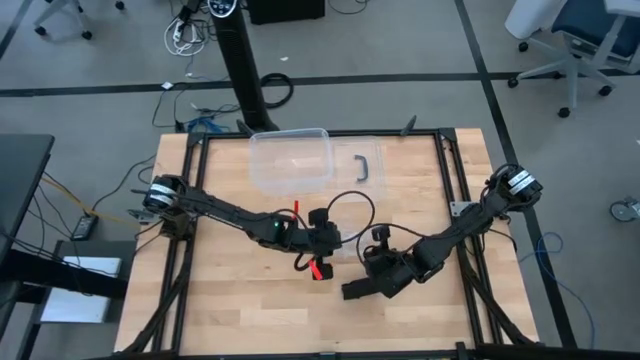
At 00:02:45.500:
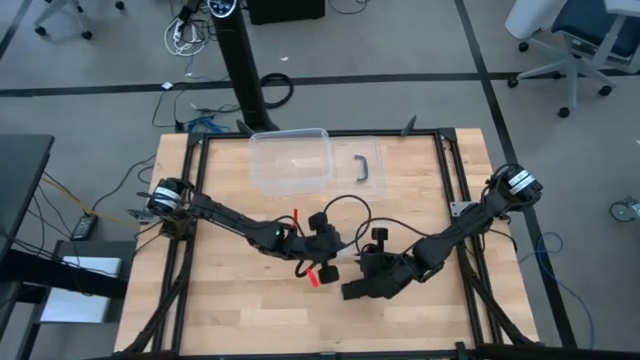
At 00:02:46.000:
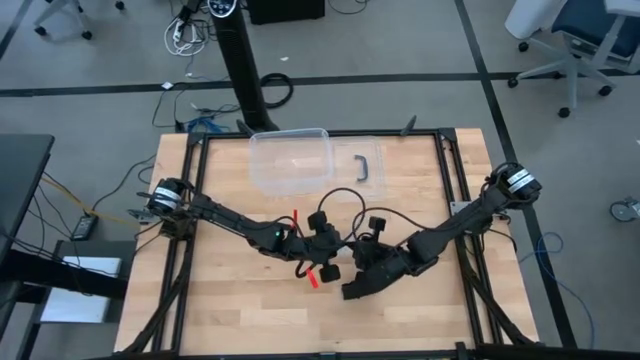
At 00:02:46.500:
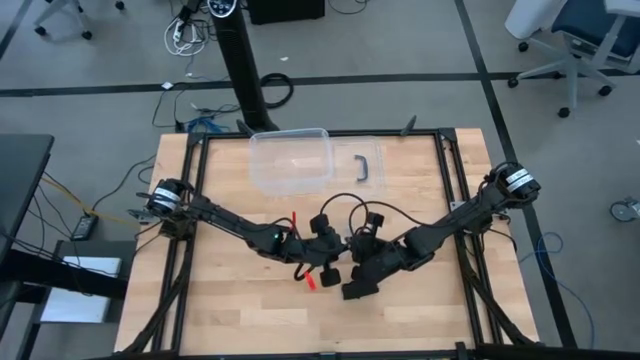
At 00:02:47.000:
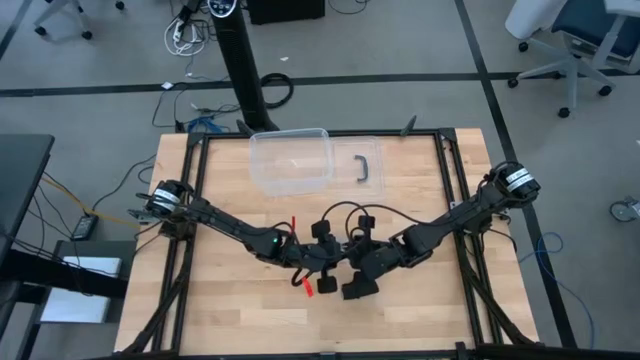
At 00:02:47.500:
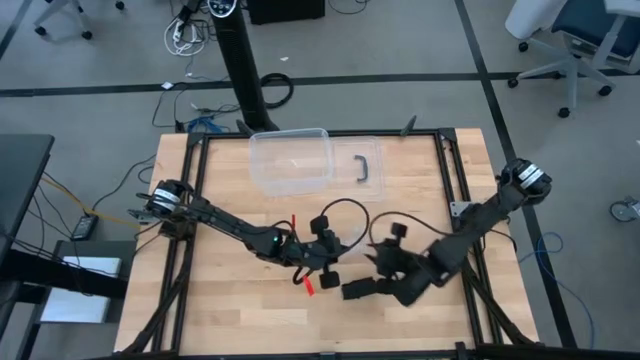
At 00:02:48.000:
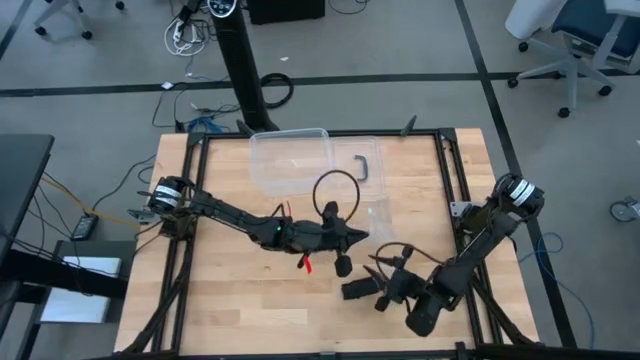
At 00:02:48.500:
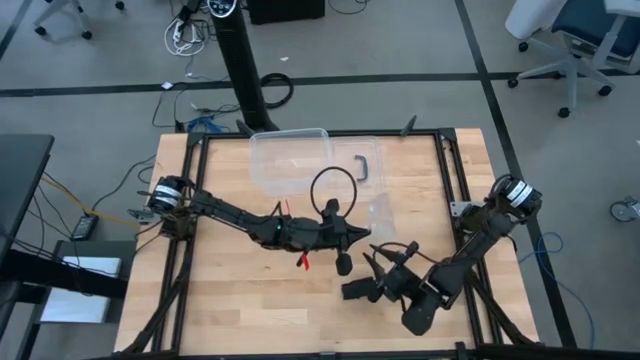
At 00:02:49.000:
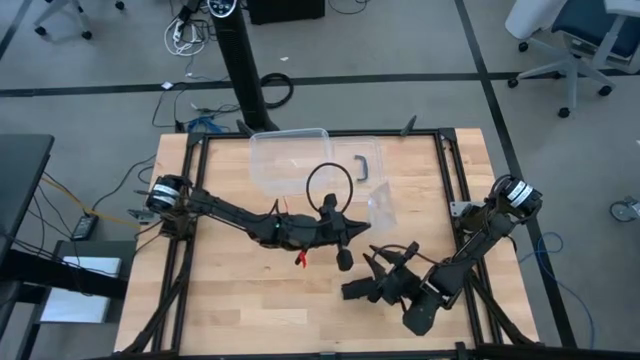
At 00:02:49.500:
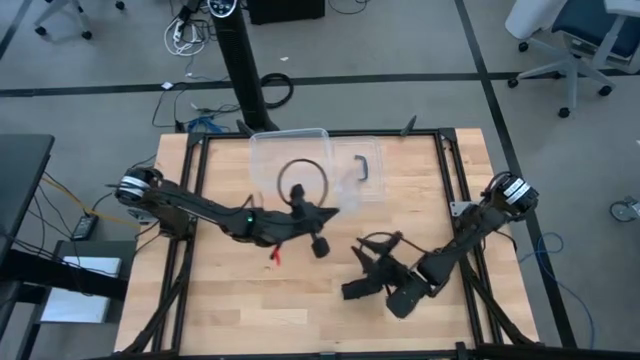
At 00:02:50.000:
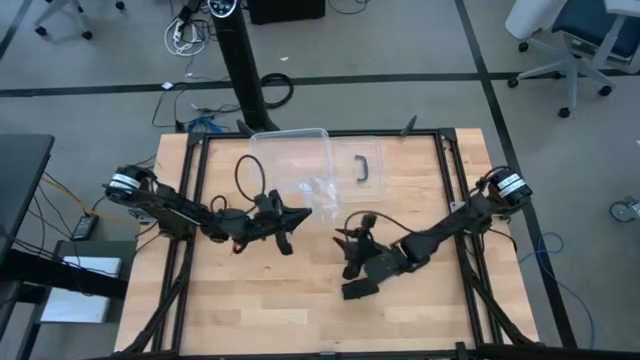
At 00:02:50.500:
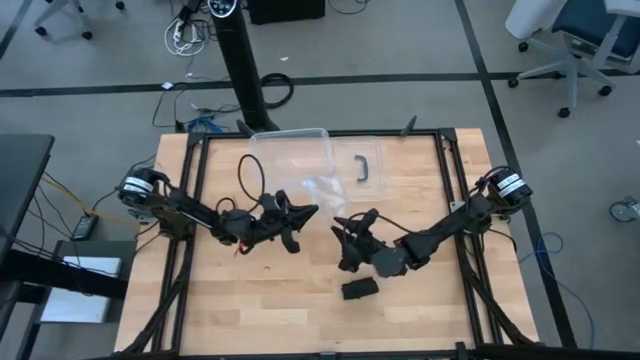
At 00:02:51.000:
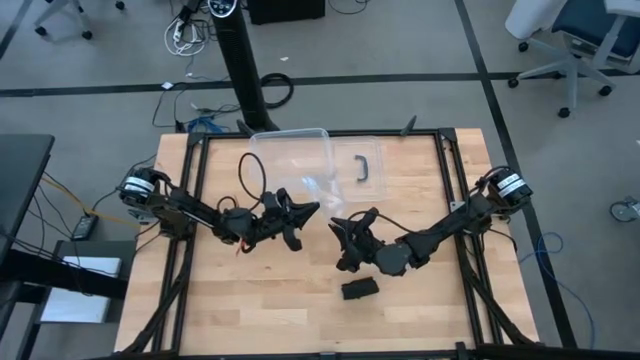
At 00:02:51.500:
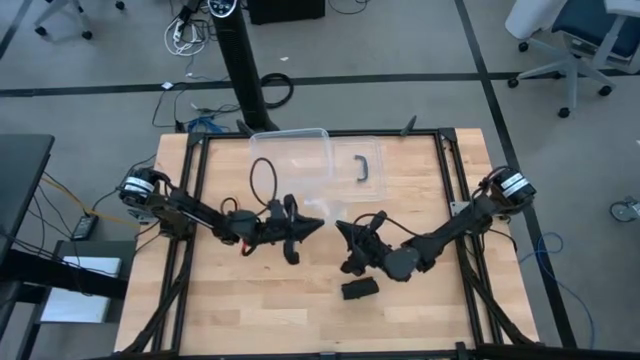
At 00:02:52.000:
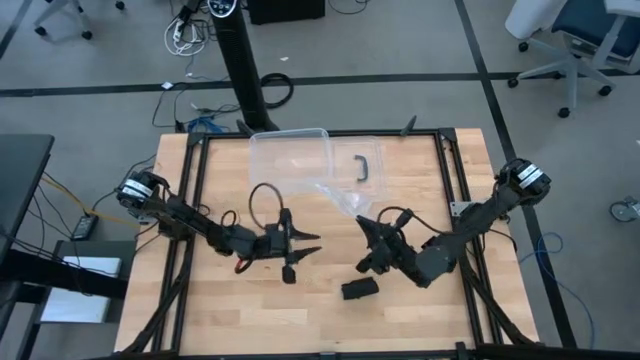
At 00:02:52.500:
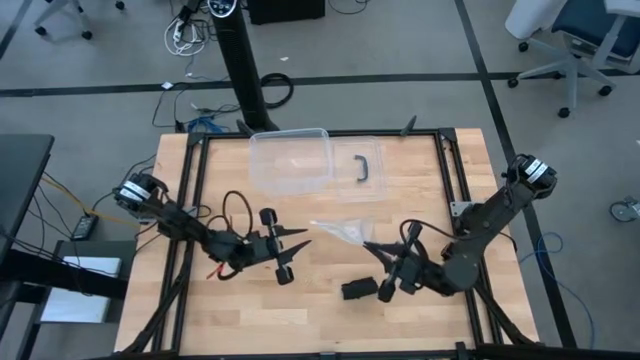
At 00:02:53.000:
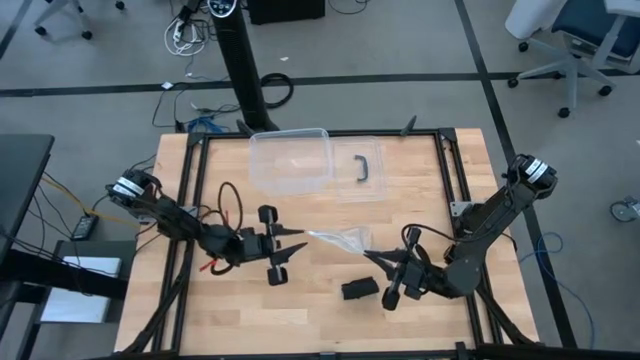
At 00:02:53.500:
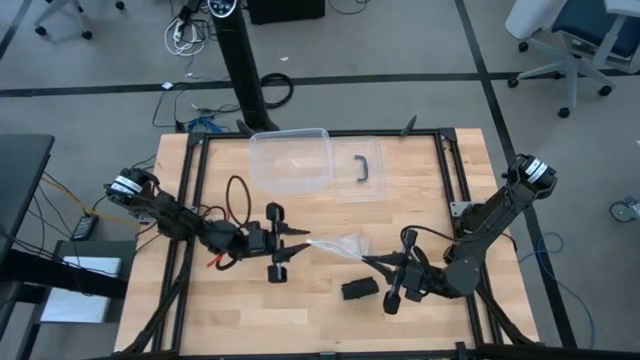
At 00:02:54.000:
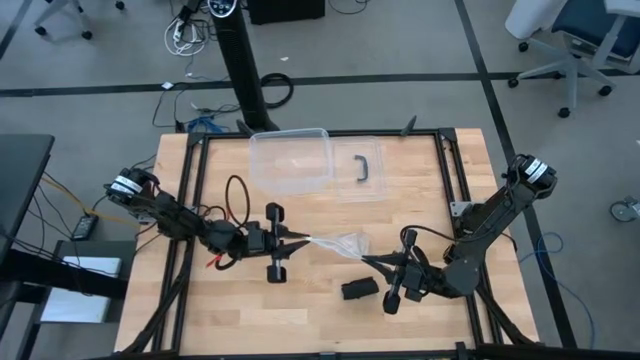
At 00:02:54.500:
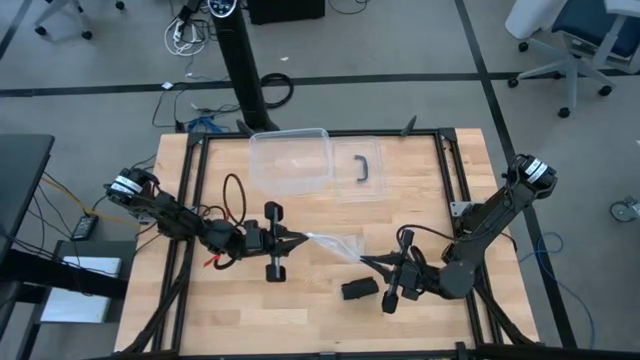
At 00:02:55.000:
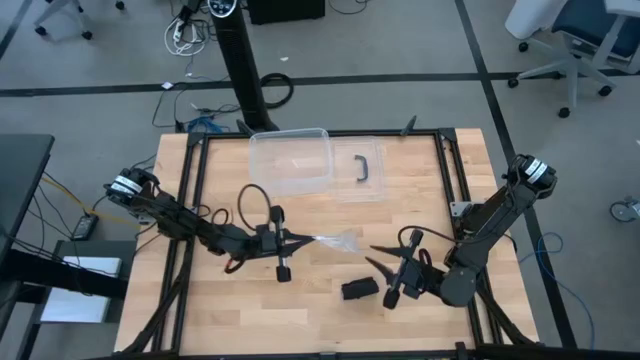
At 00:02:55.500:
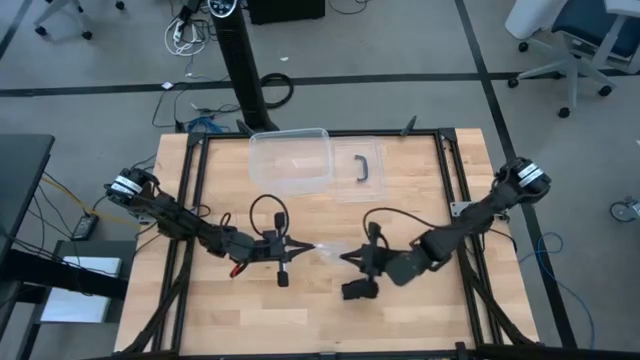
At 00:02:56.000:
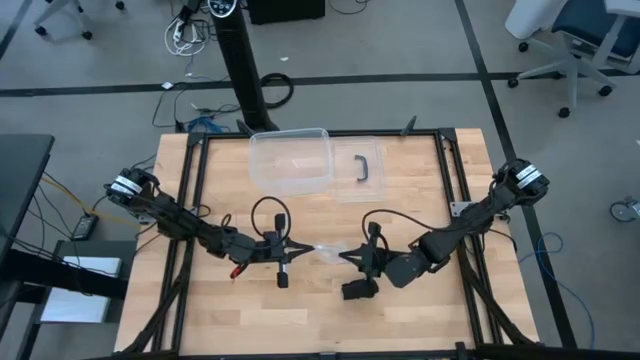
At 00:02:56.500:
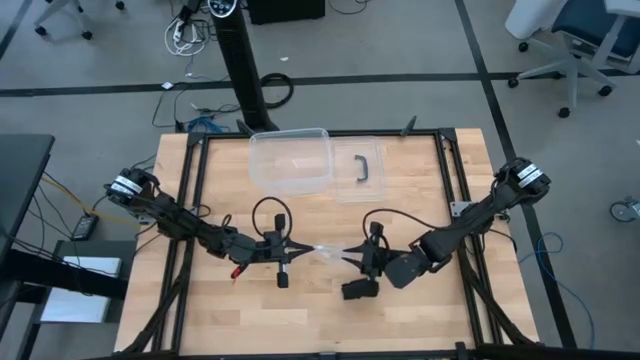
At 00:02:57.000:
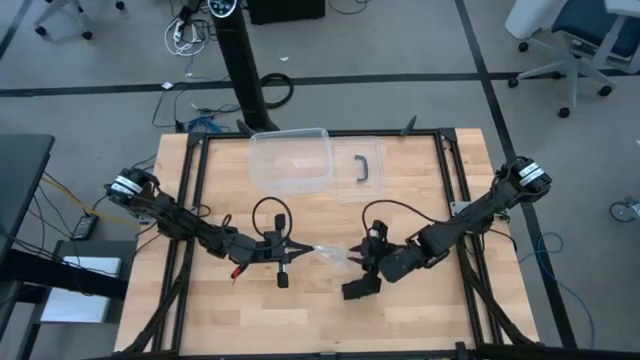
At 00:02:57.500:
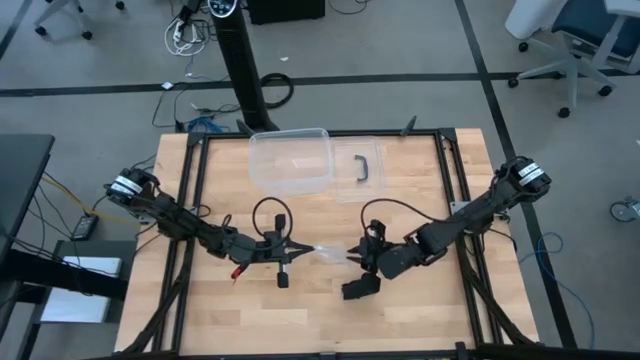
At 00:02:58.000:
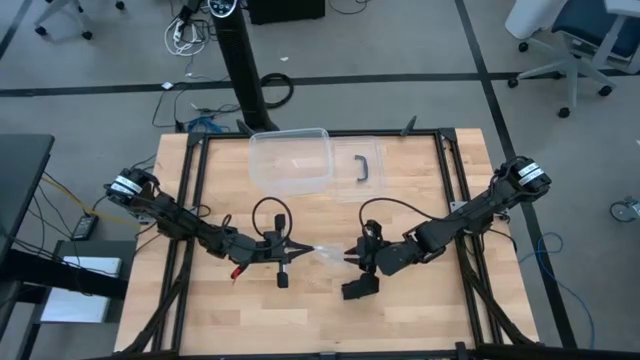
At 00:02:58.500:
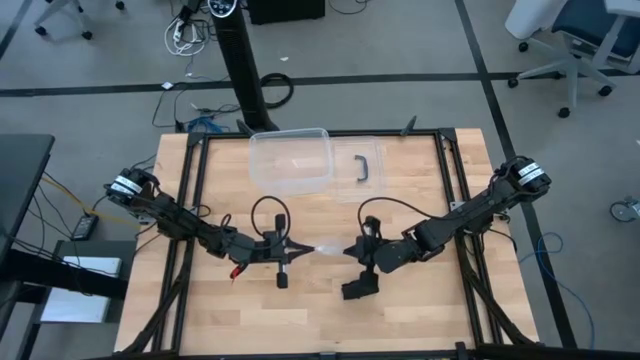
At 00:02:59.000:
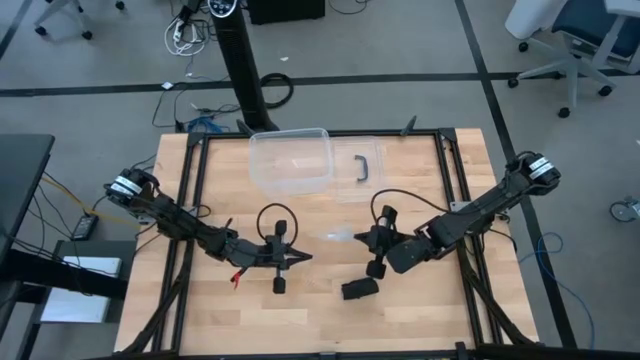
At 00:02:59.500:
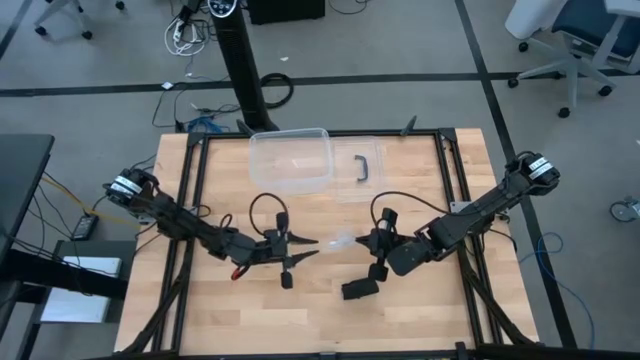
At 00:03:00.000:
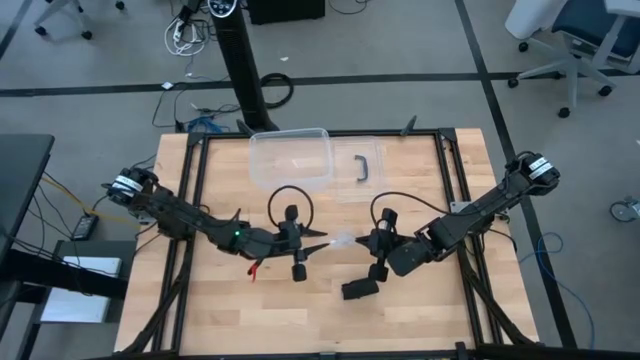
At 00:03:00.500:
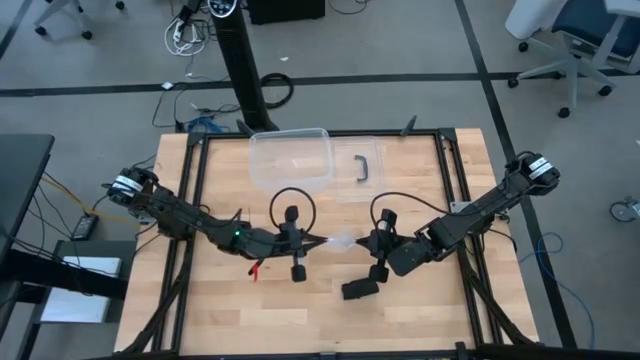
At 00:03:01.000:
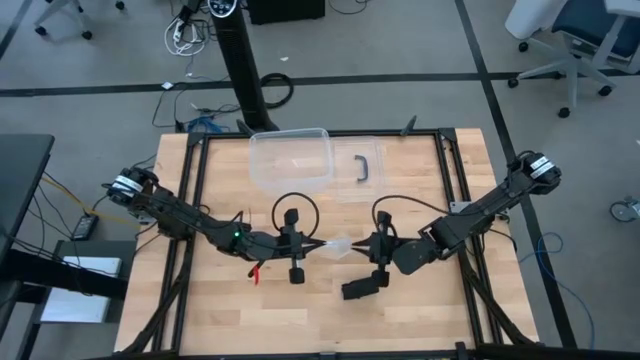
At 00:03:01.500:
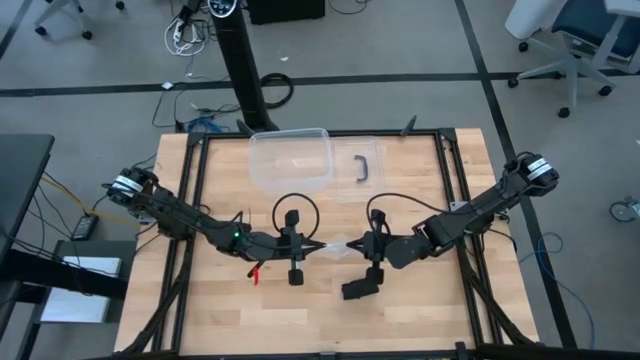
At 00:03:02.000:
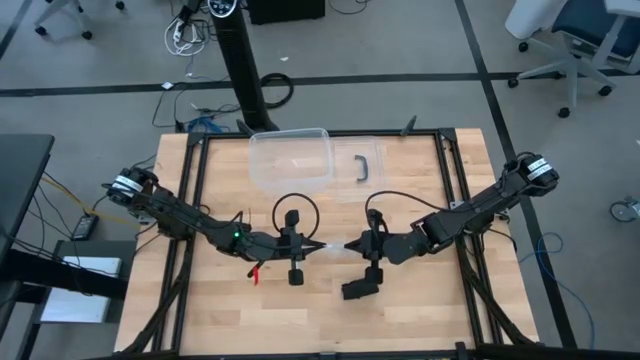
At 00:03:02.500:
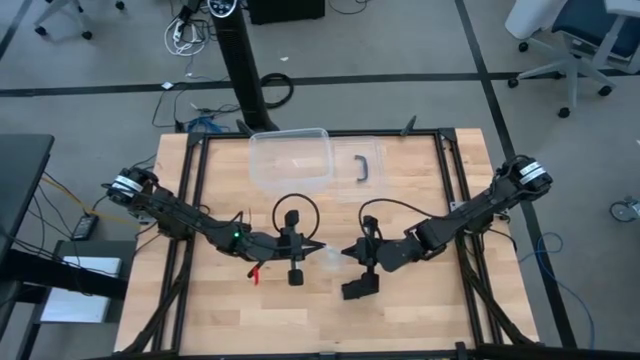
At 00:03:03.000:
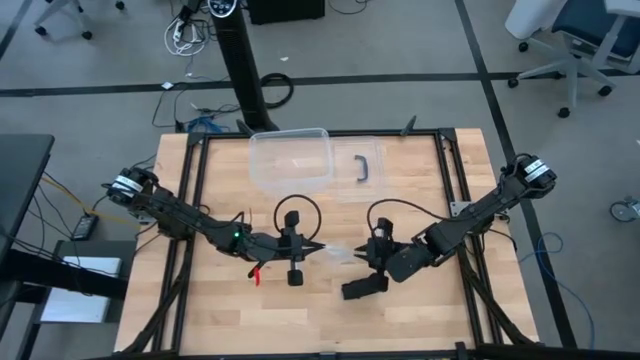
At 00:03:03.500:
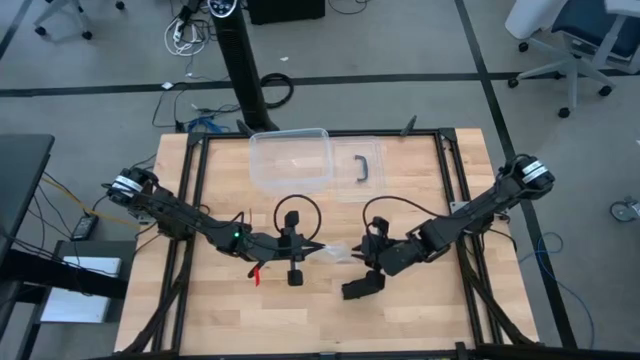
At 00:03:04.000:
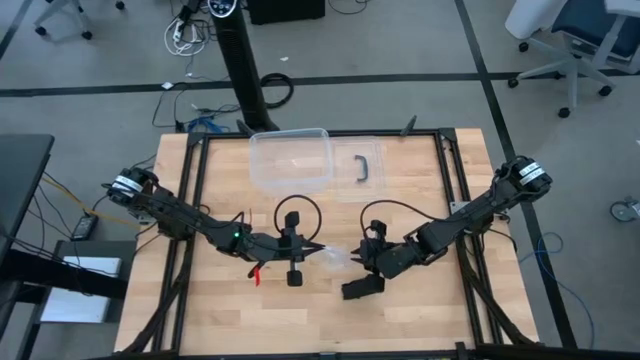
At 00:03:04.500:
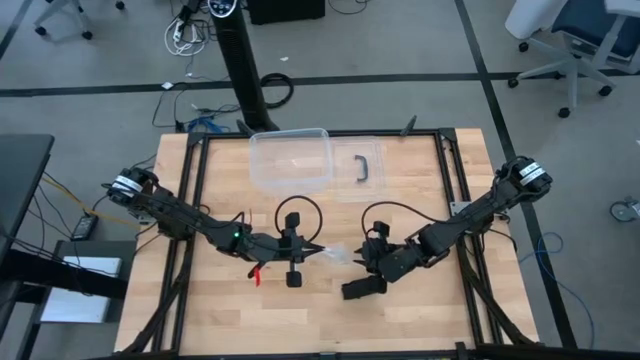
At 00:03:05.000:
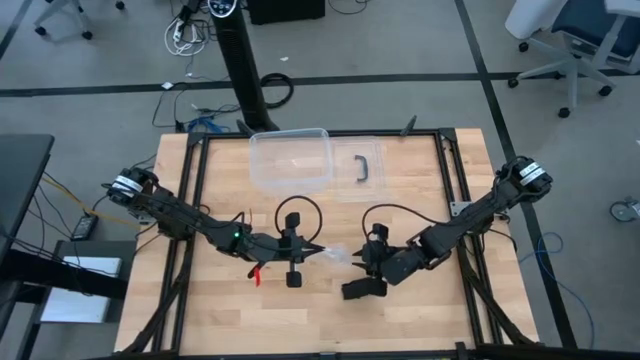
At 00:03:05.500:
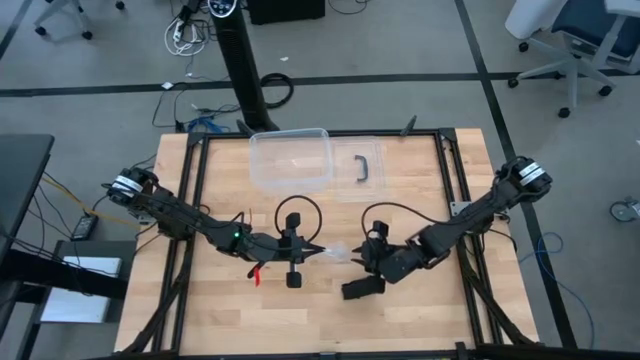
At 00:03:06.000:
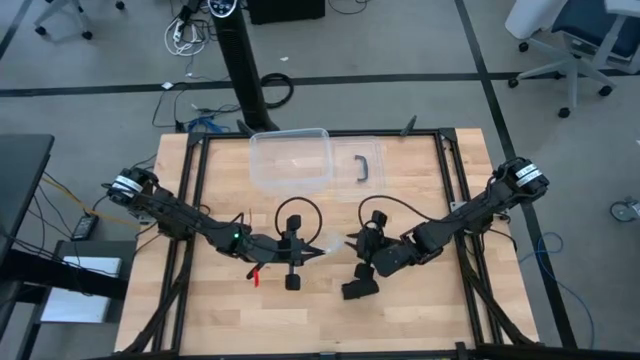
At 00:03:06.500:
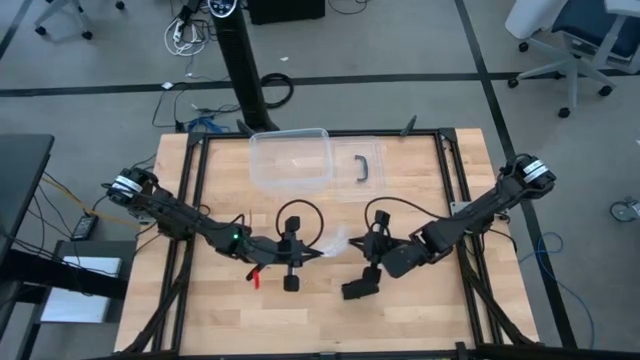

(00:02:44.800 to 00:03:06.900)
Task: Roll bandage
Open the transparent zip bag
